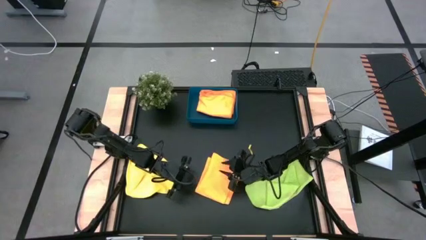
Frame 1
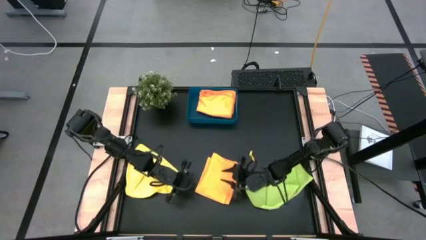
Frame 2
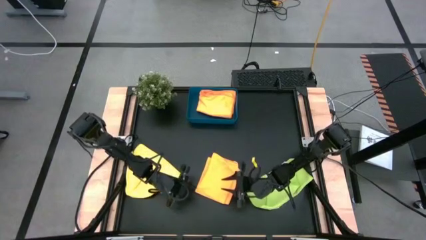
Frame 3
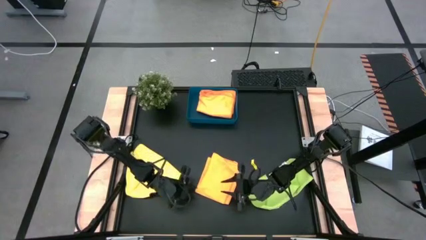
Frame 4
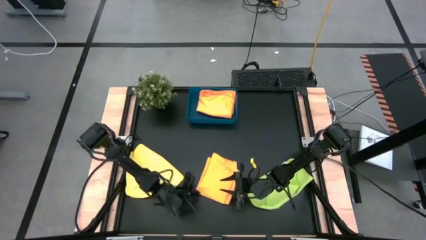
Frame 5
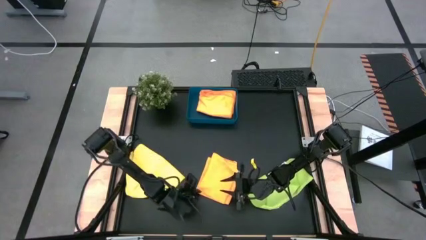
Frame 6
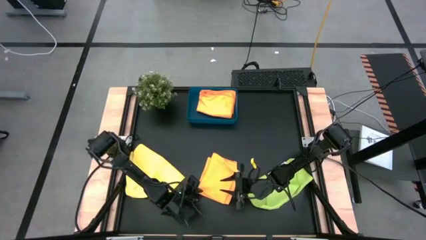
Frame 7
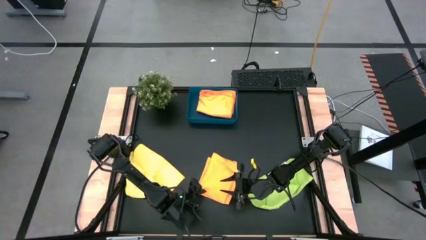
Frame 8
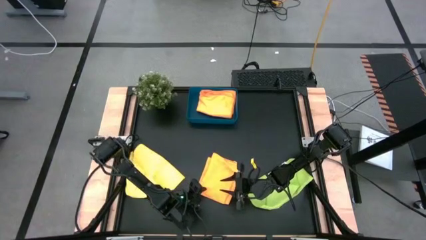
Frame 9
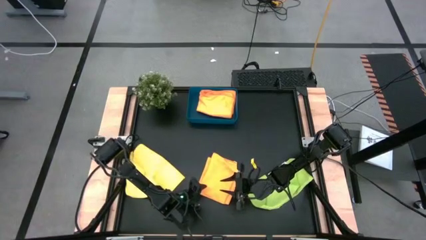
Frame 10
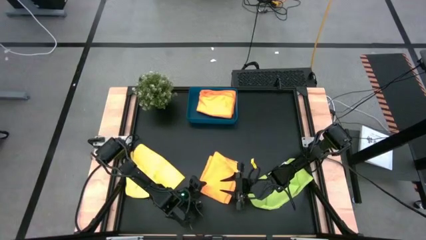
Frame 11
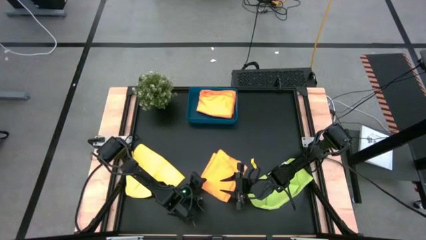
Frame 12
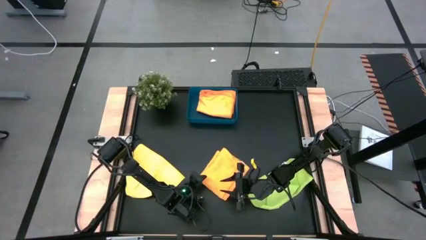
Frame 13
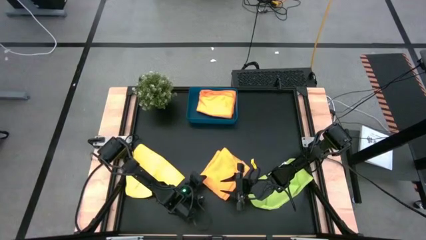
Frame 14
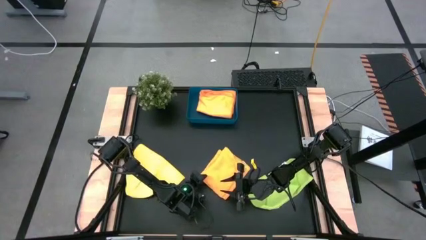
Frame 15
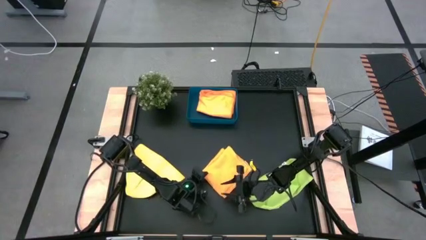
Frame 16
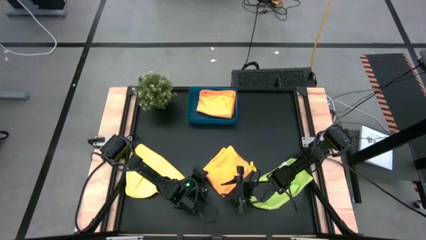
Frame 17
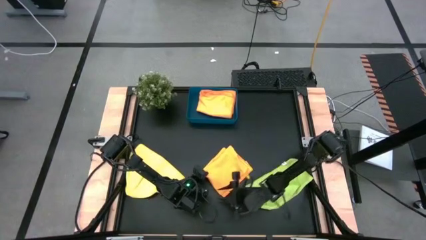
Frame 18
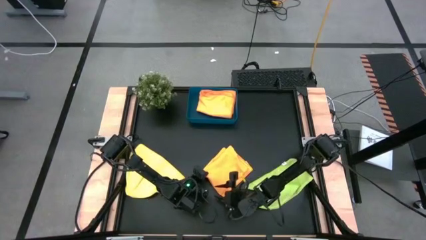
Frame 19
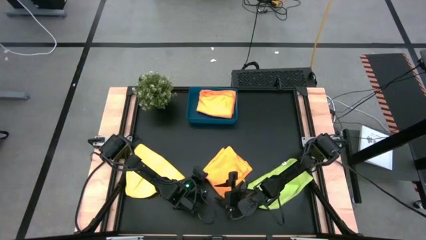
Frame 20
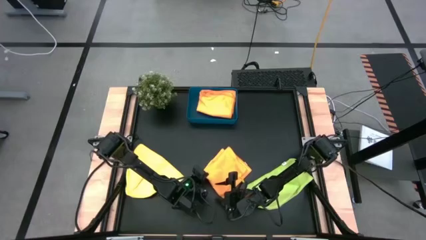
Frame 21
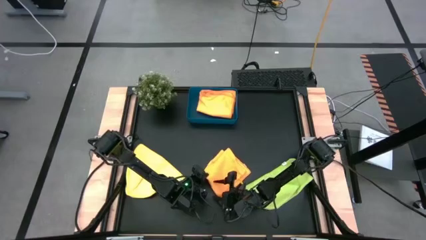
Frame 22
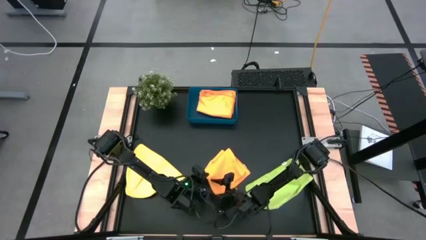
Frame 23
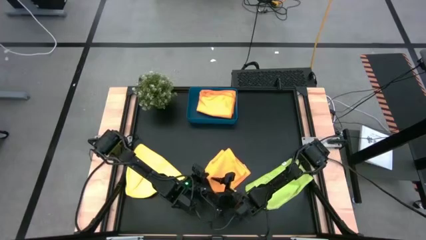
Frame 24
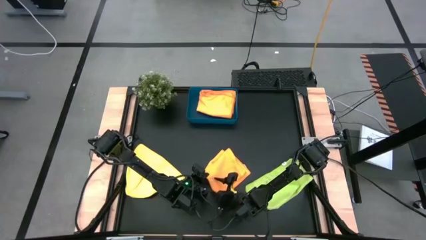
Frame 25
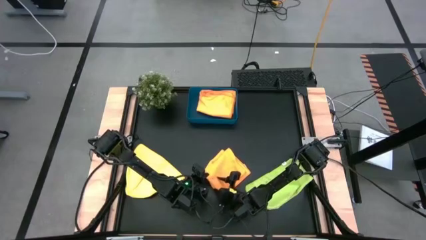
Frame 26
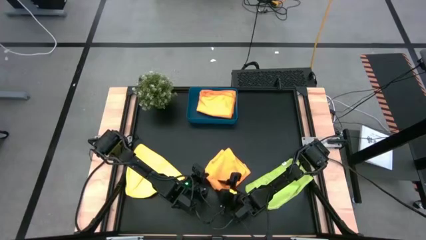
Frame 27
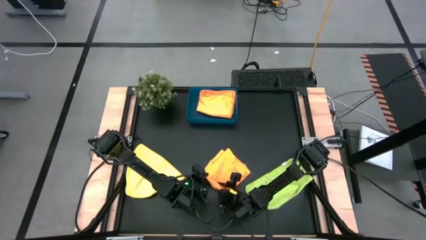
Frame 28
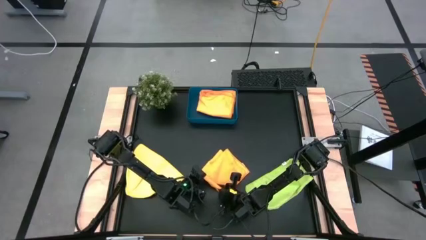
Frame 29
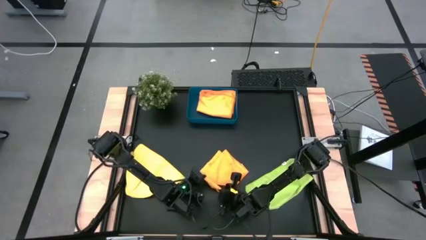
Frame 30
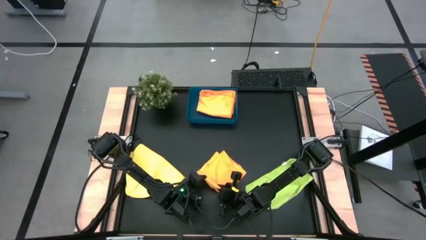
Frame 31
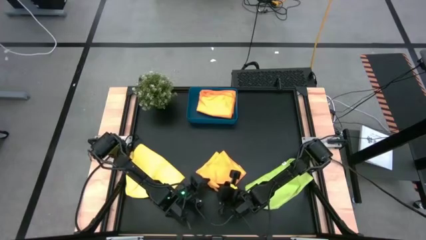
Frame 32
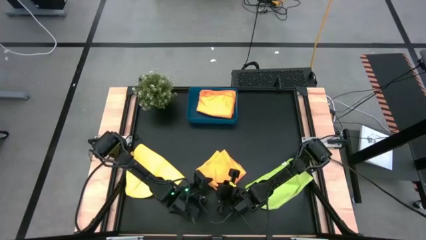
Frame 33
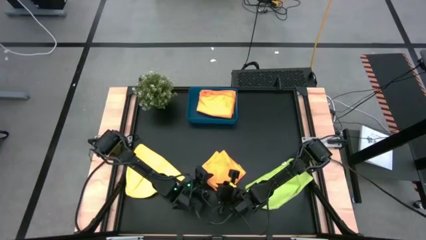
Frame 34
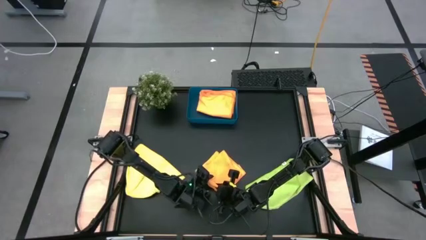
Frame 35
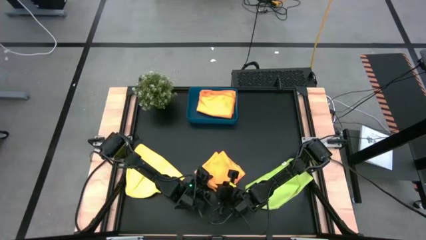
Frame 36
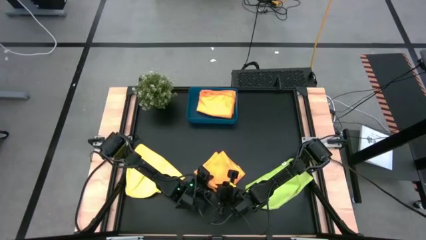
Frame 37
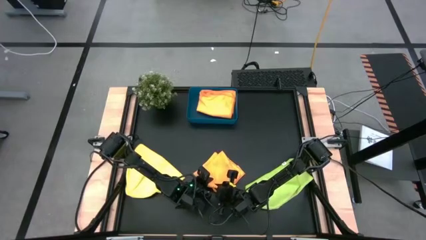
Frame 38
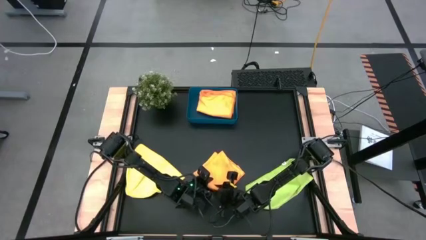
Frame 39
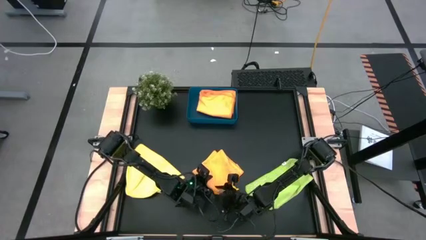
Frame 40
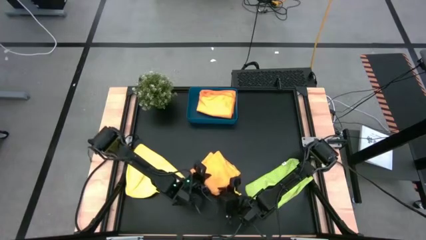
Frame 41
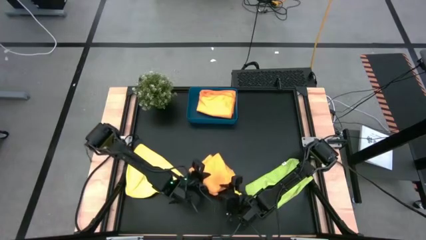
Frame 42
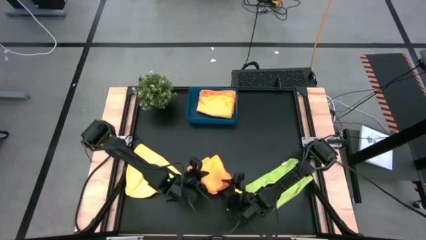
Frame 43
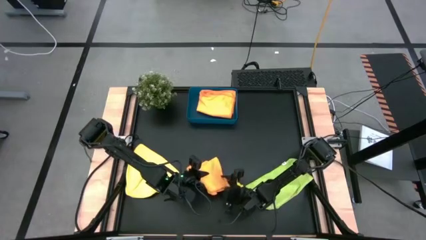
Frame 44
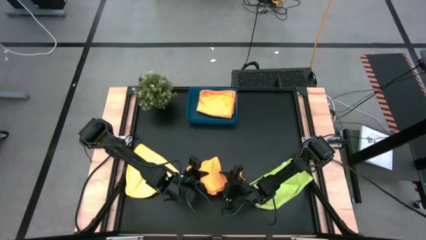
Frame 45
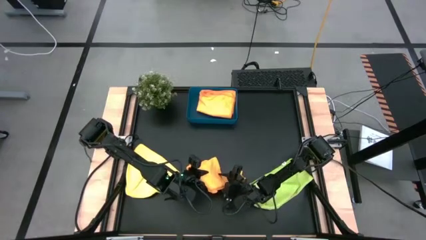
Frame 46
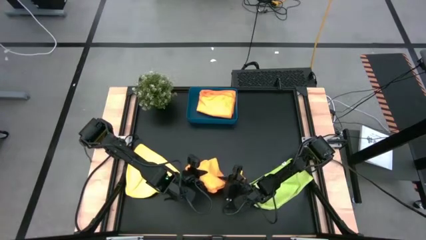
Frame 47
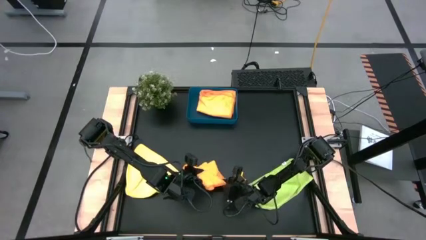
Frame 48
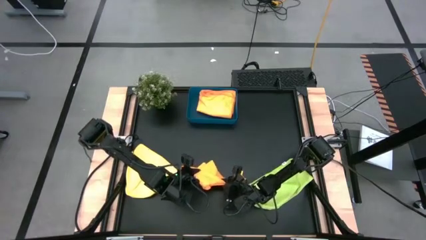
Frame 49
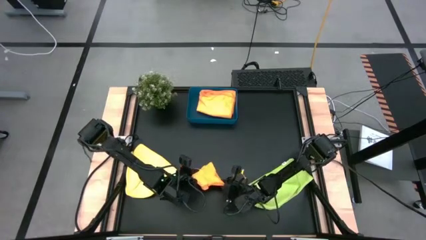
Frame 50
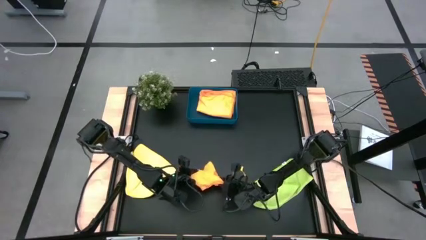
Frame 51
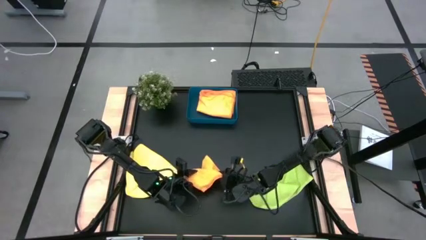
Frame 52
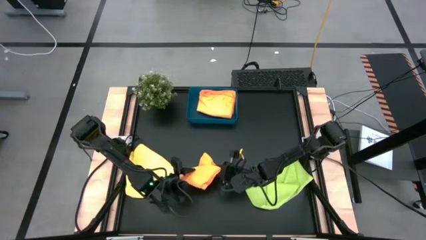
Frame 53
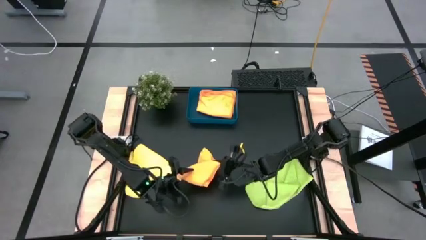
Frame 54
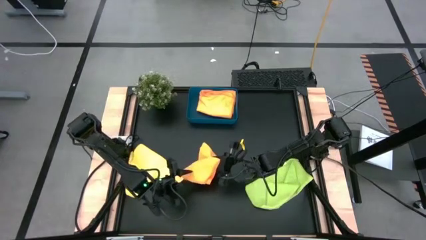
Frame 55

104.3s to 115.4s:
Task: Fold microfiber towels
Put the orange microfiber towel into the blue bin

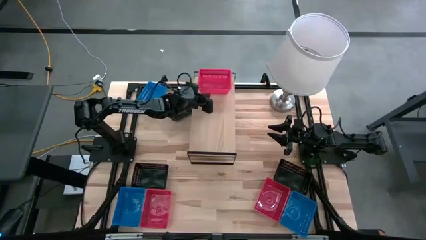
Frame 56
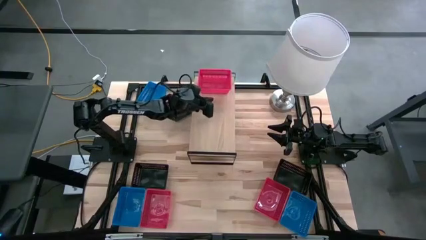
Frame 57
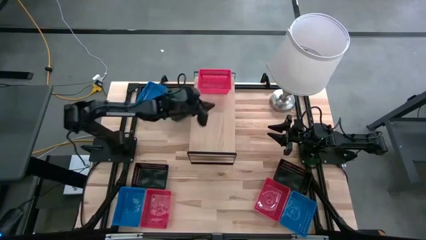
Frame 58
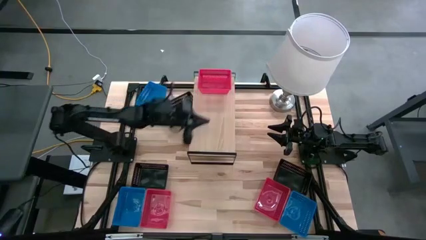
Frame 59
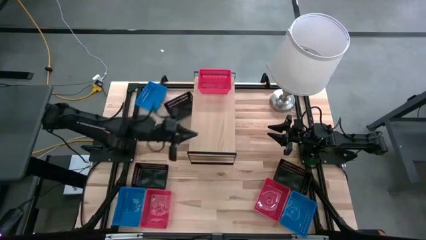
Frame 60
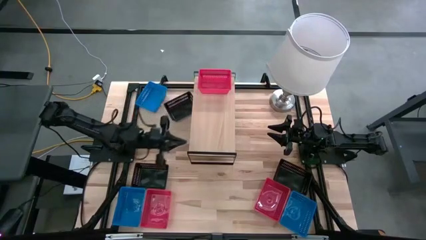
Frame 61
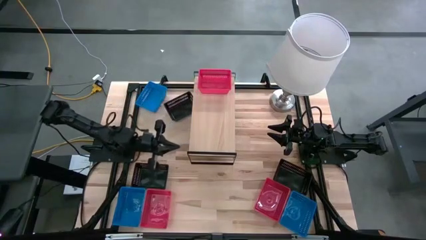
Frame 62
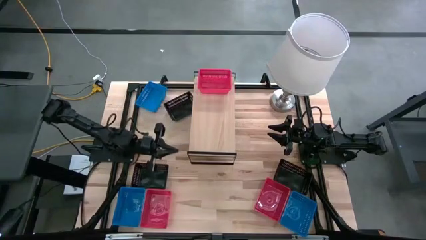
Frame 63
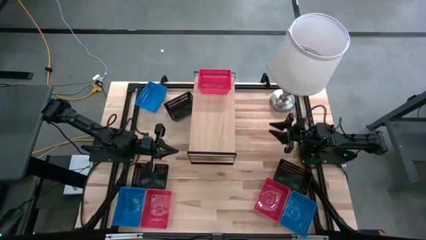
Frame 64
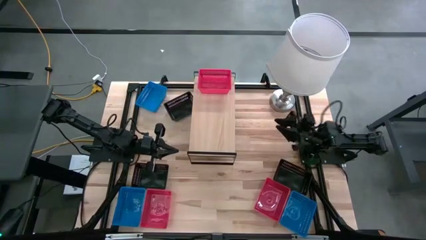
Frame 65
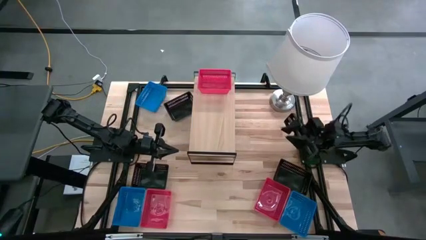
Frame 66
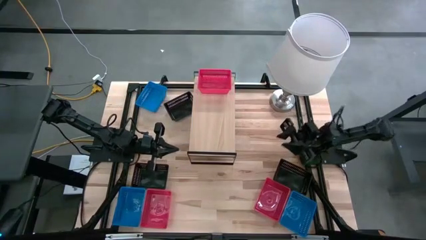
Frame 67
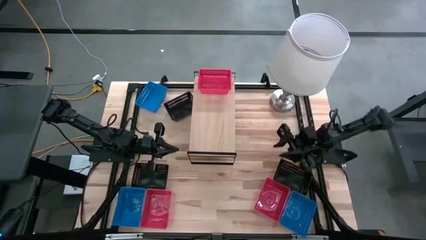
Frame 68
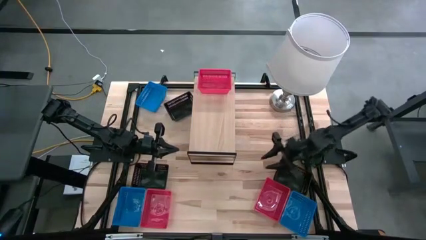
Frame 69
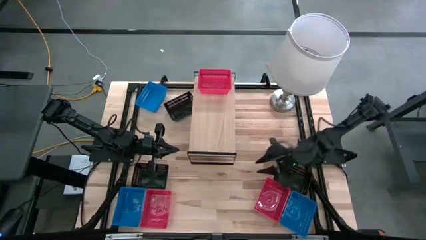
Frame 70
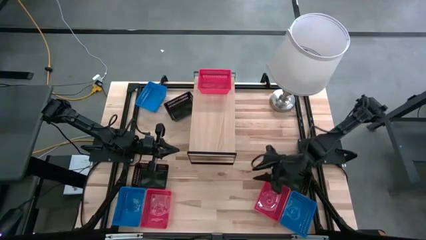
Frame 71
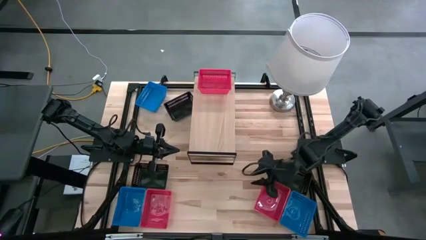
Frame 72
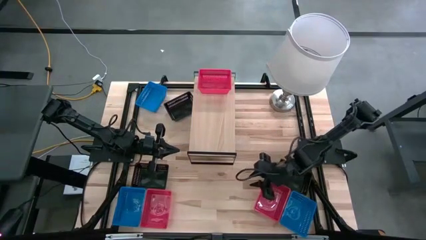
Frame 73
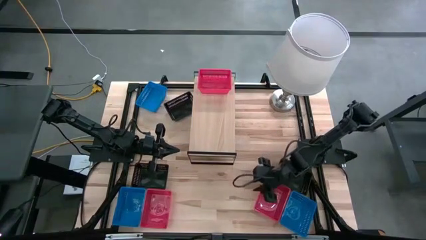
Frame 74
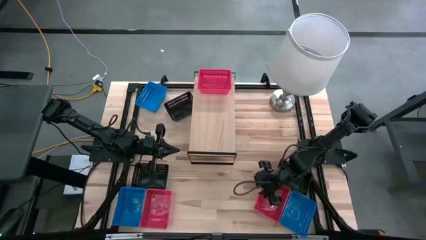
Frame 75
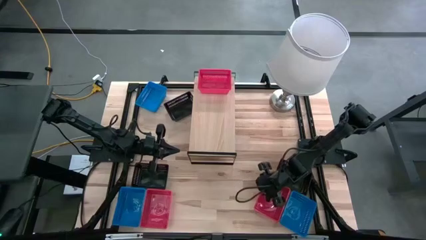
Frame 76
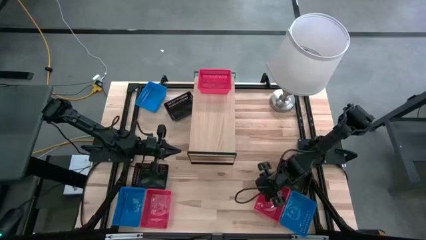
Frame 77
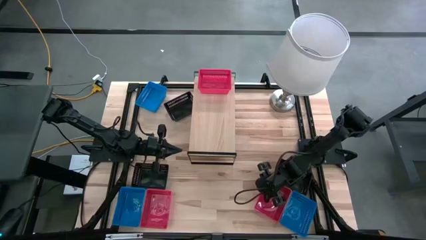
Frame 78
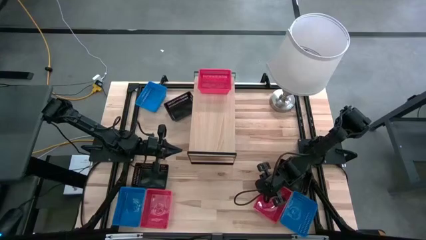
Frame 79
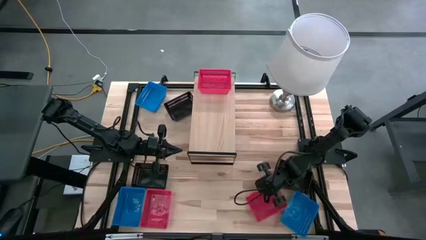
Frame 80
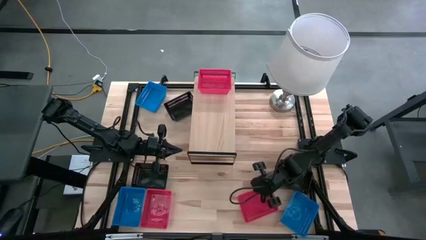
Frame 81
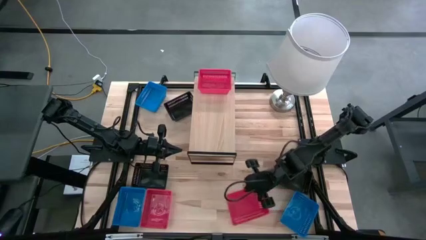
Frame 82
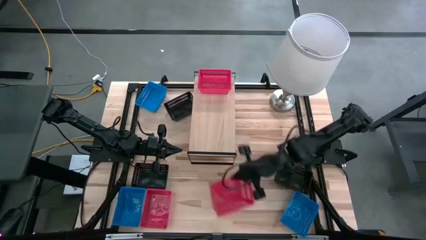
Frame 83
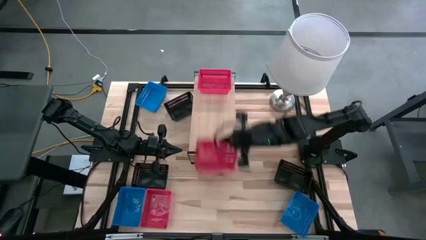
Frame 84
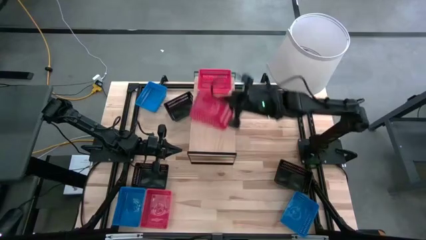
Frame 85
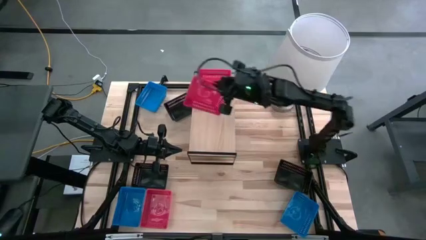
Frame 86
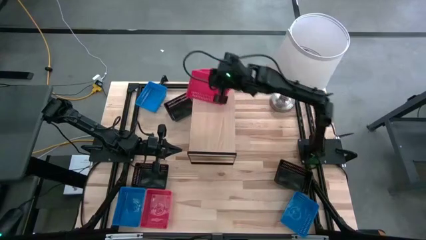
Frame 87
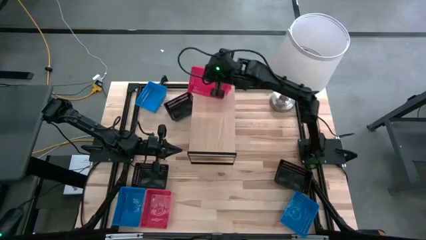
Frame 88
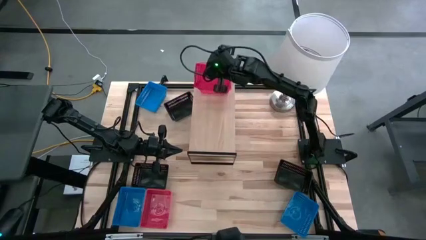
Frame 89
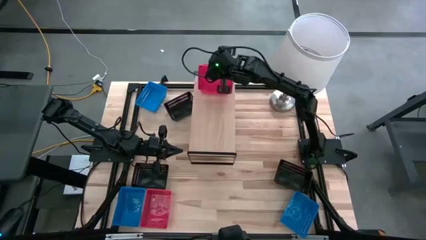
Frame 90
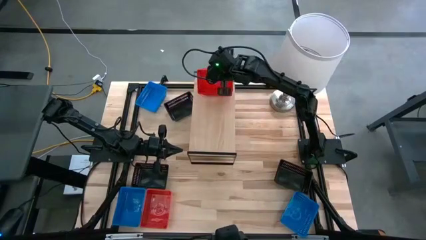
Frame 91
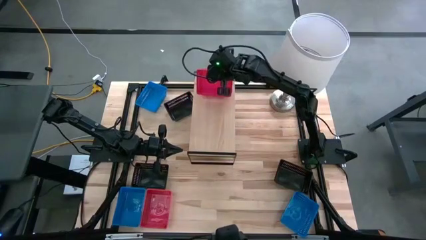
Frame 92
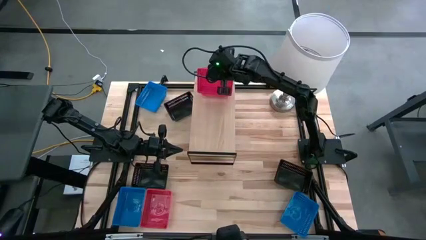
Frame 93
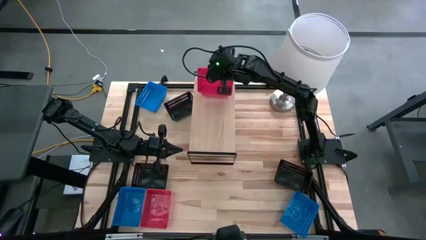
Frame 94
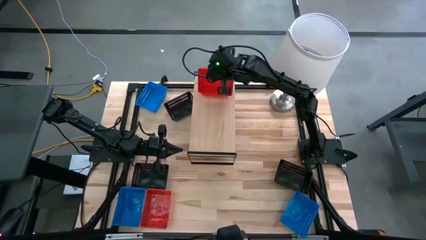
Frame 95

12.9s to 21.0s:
Task: Stack baskets on shelf by color
Stack the right red bin on top of the red bin on the shelf
